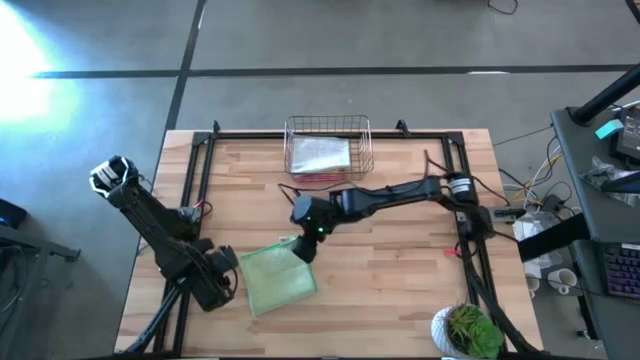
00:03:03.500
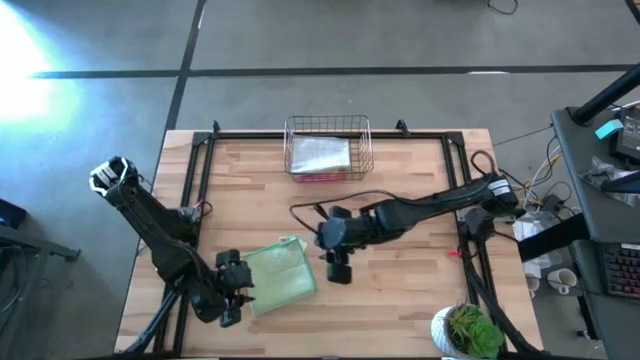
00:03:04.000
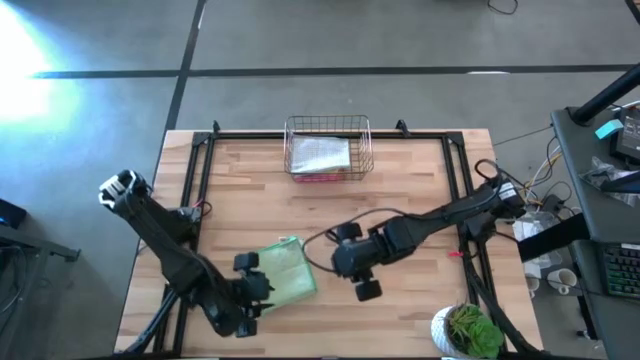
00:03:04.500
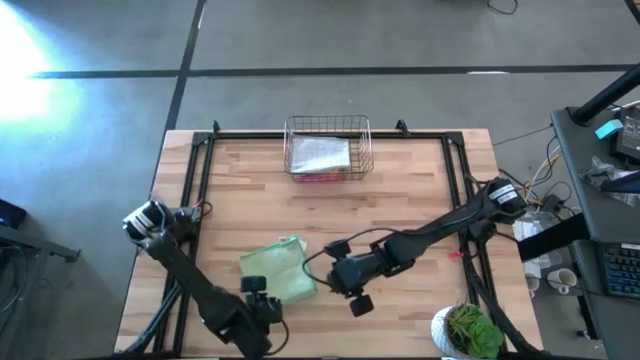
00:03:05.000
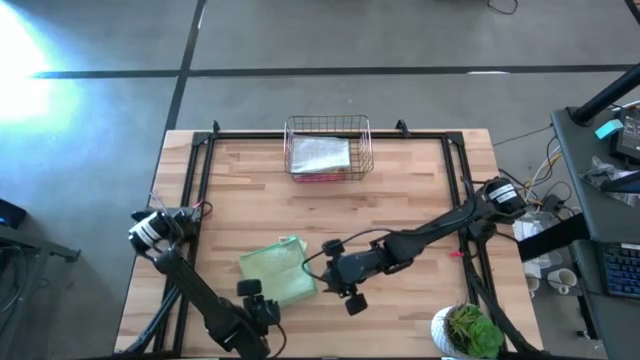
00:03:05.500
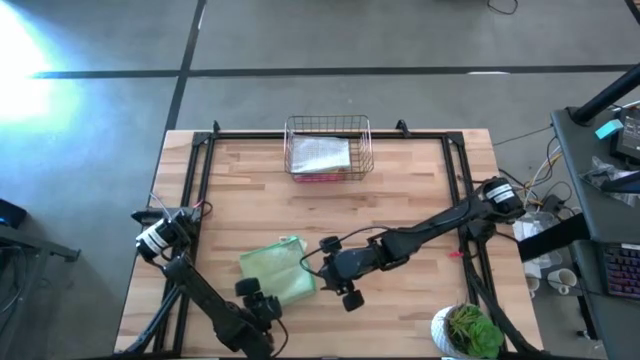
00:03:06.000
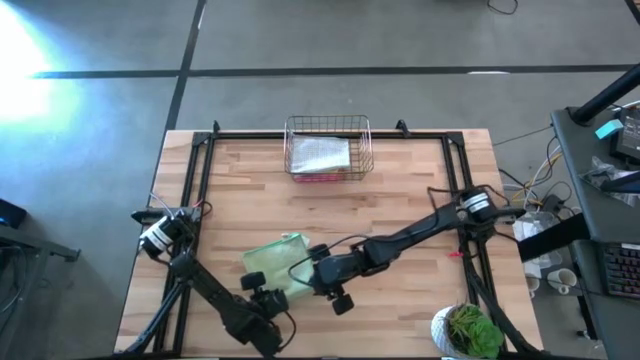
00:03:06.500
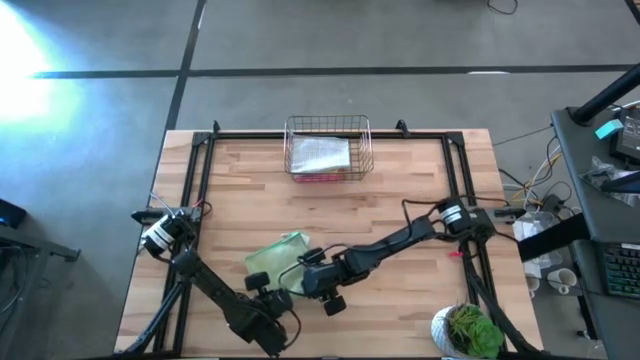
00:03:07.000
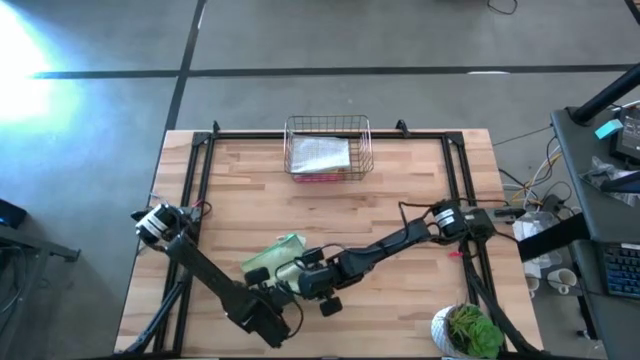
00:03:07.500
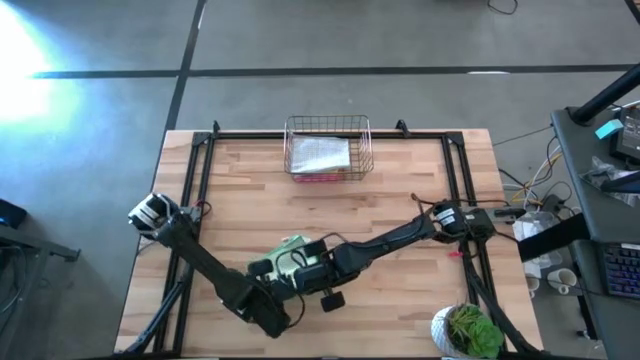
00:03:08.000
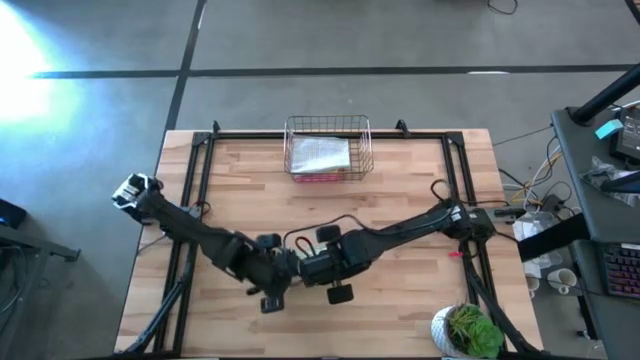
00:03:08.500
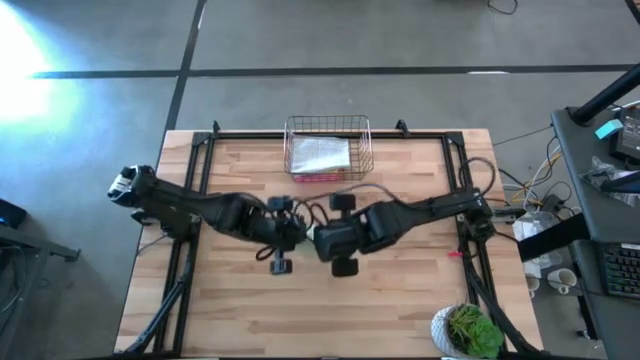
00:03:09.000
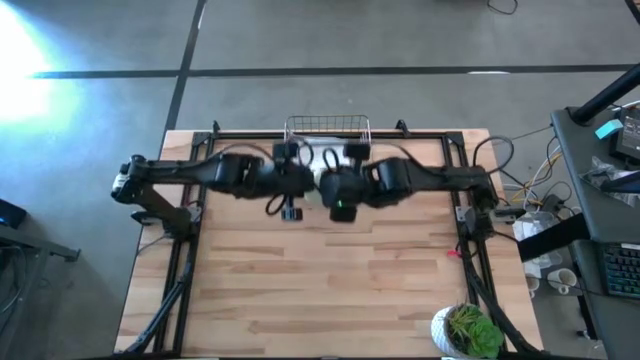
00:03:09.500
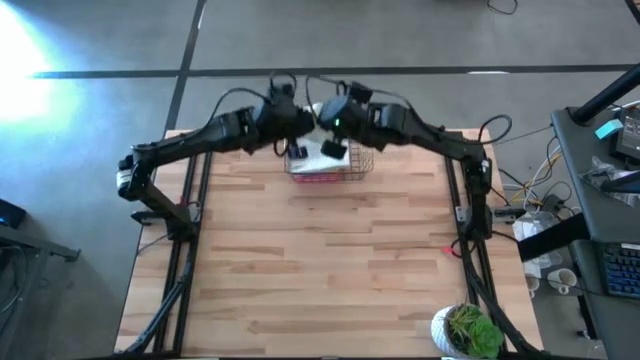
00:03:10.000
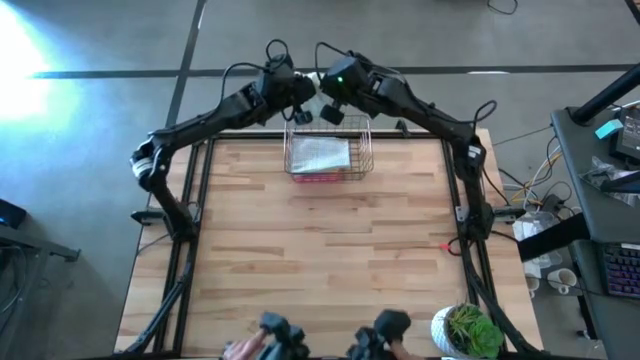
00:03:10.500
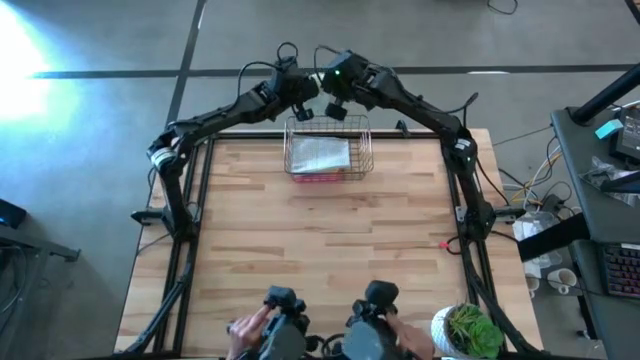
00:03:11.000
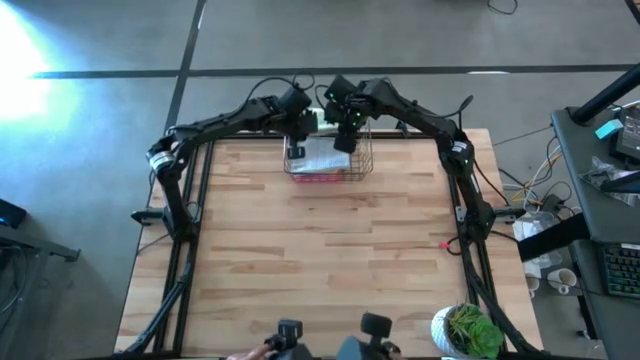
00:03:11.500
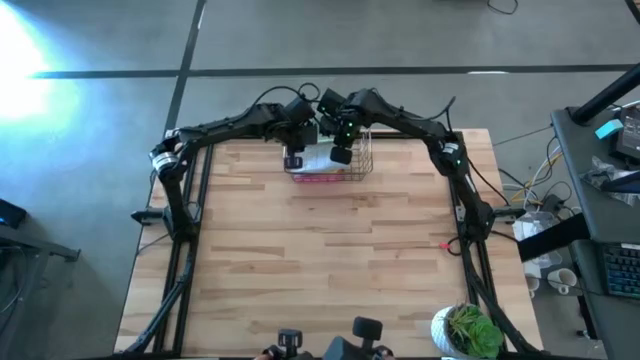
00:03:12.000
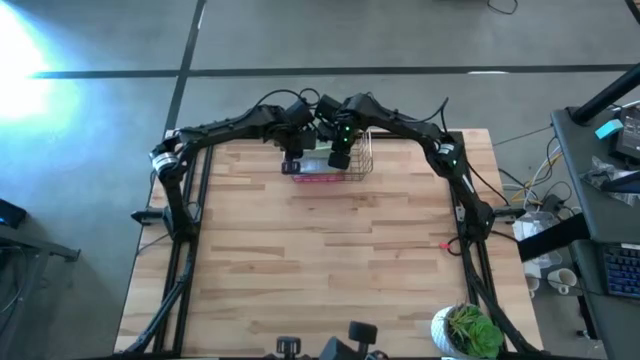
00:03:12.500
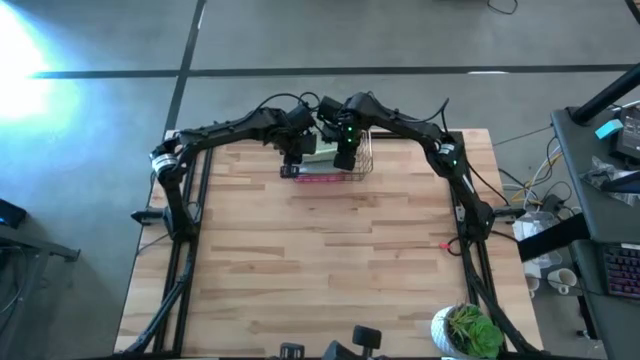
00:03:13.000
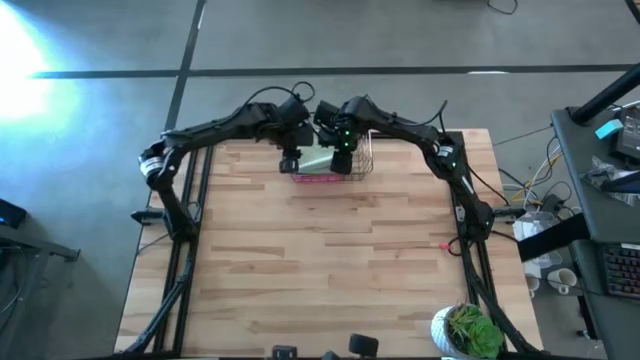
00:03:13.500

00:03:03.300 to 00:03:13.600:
Task: Fold microfiber towels
Stack the folded light green microfiber cloth on top of the gray microfiber cloth in the wire basket

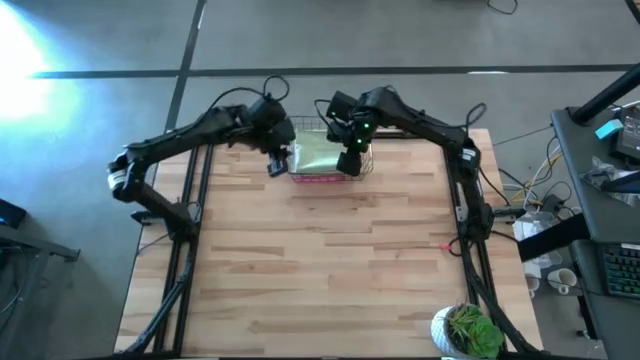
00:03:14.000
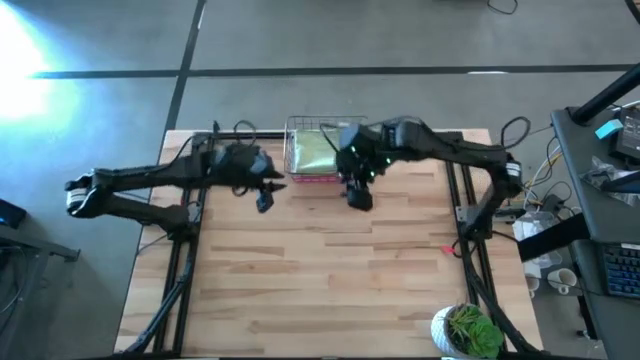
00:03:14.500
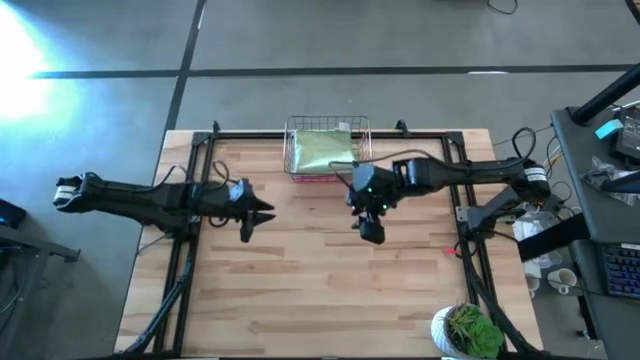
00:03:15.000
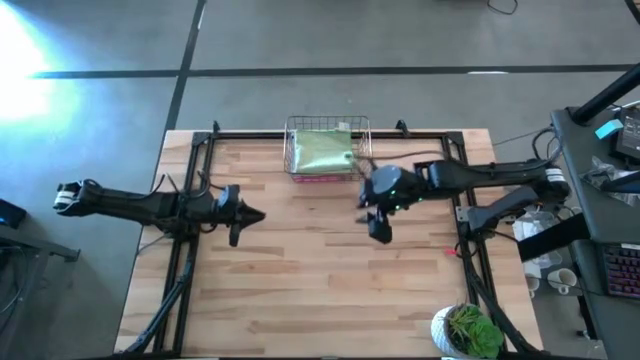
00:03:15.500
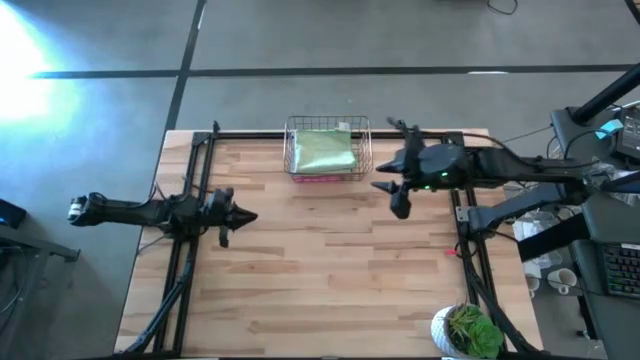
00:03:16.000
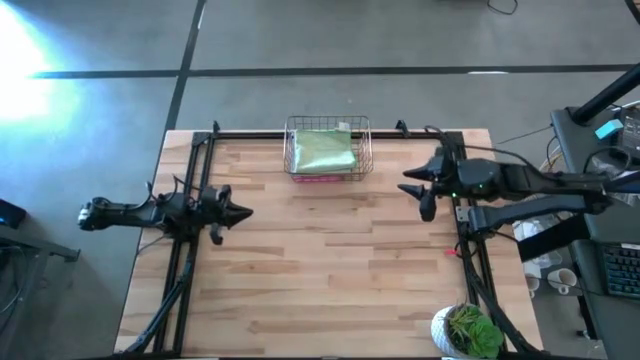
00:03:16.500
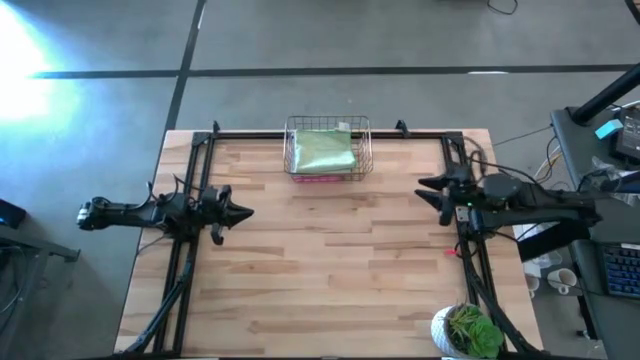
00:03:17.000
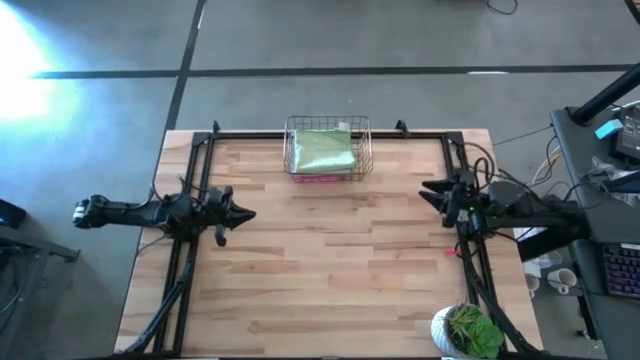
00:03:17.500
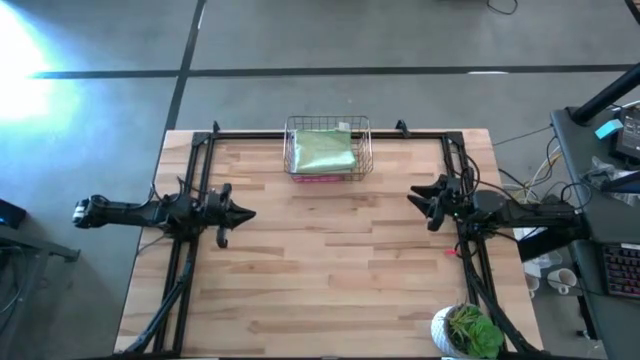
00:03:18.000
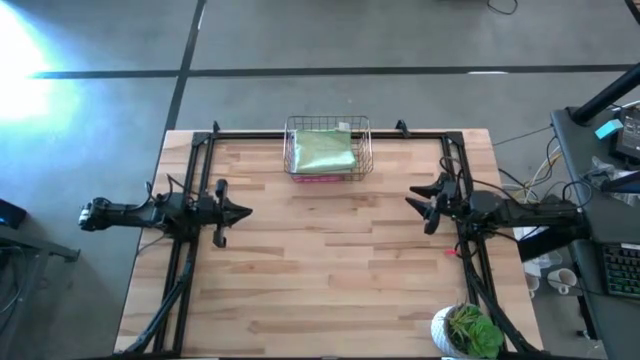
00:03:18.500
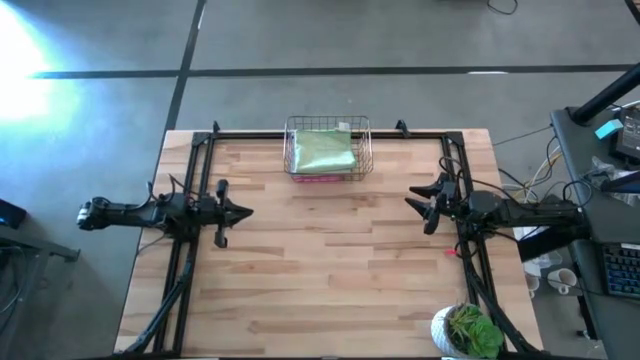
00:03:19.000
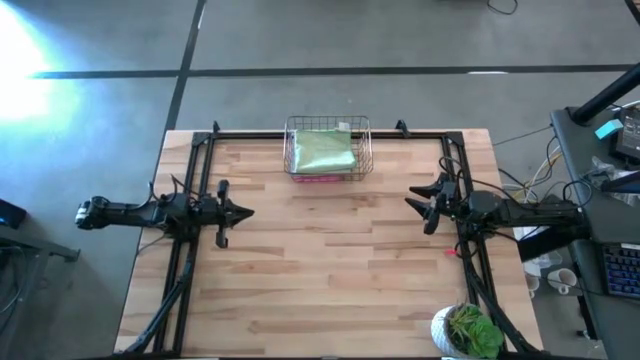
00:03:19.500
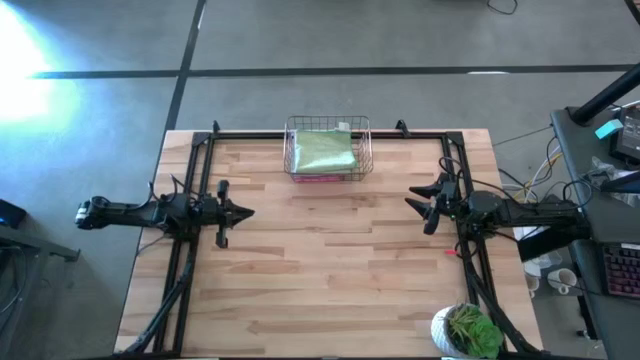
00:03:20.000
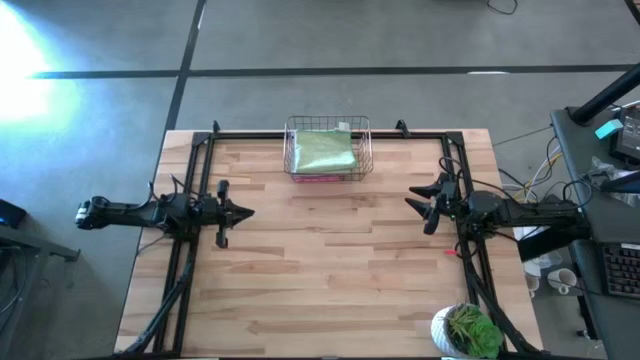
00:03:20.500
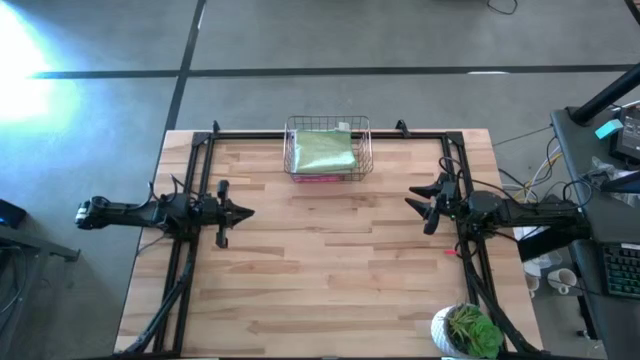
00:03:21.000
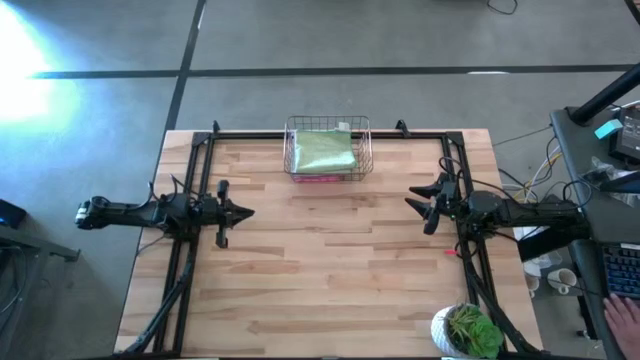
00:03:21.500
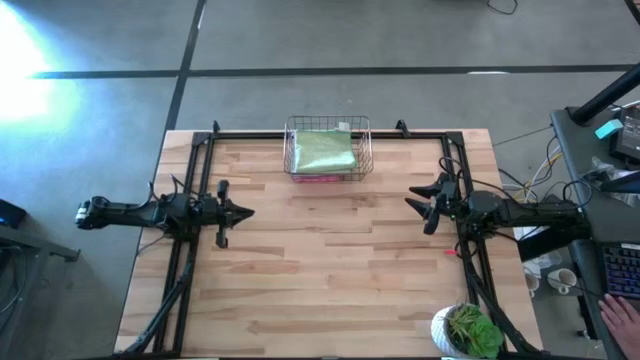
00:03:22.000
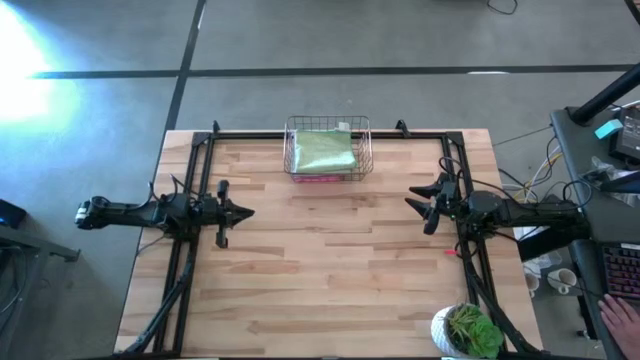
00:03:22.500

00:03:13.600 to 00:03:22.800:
Return To Home Position

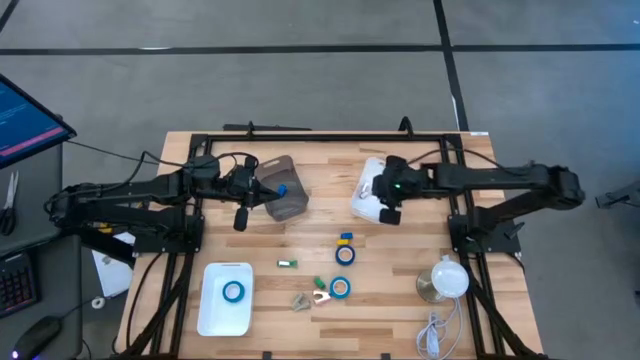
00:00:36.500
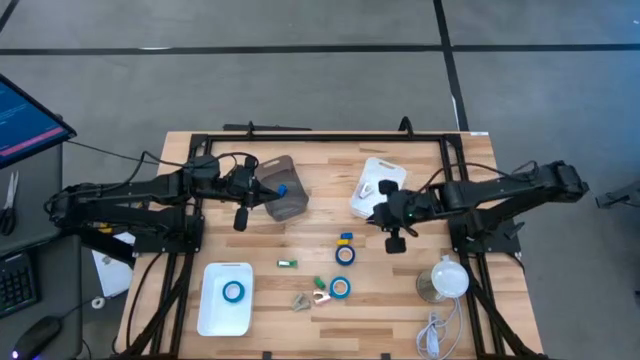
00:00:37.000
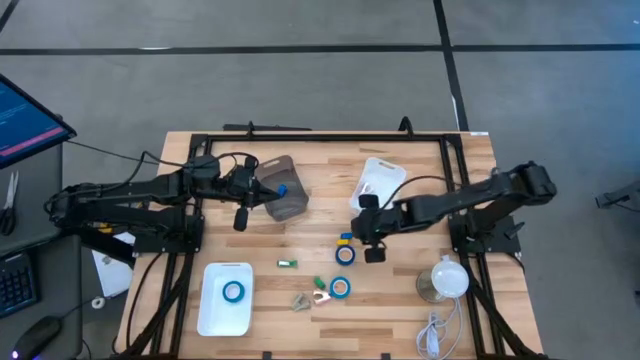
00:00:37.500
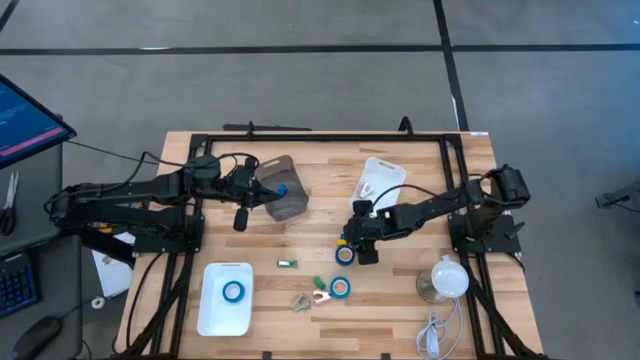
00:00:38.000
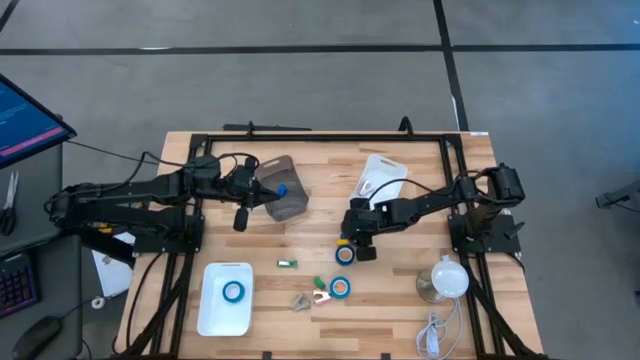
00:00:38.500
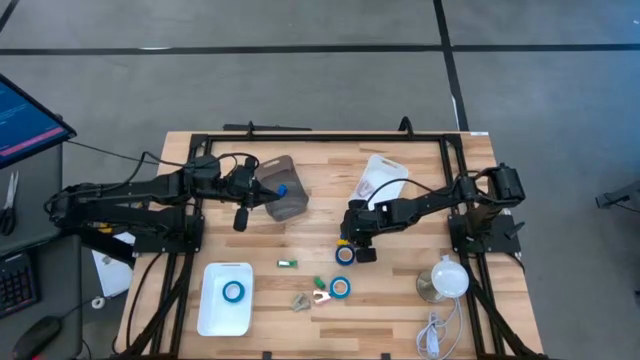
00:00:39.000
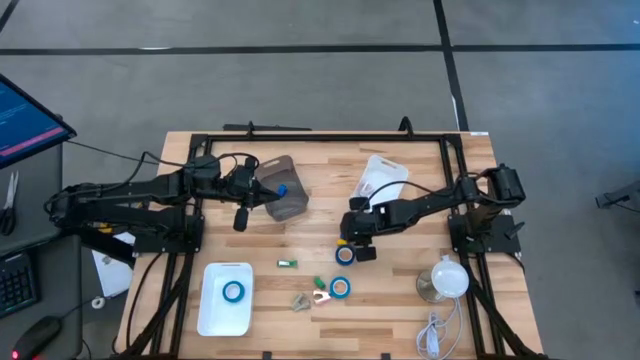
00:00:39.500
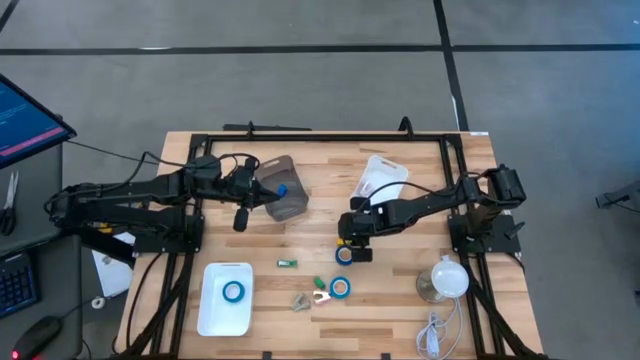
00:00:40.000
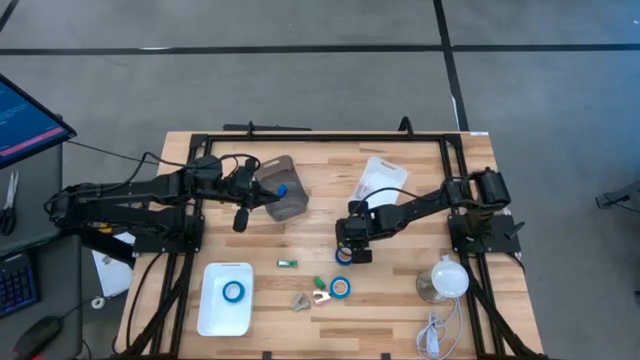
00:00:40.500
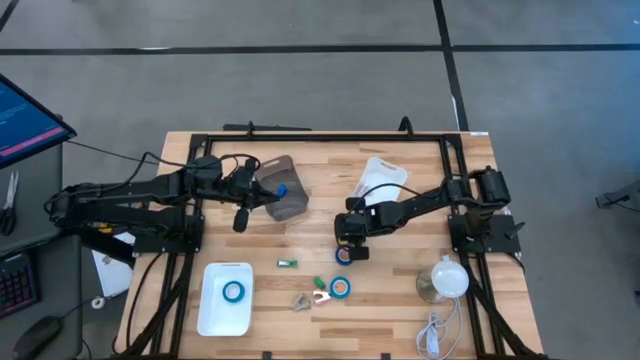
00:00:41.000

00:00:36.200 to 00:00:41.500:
Task: Pick and place Stapler, Stapler remover, tape
Put the blue stapler into the black bin
